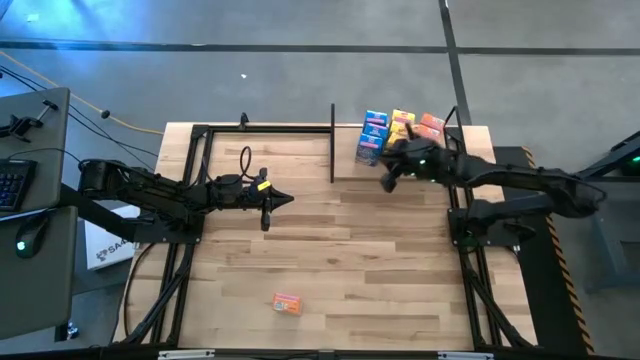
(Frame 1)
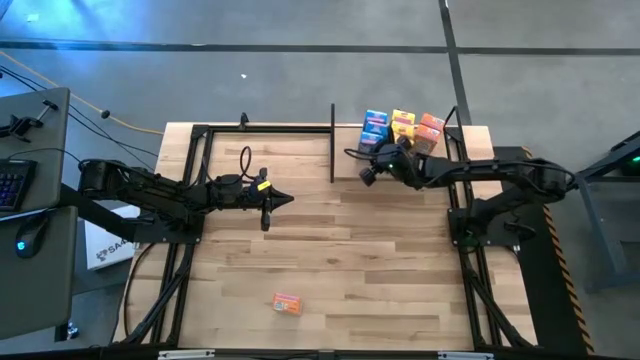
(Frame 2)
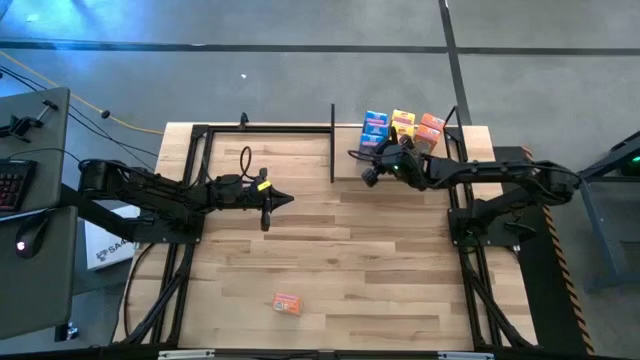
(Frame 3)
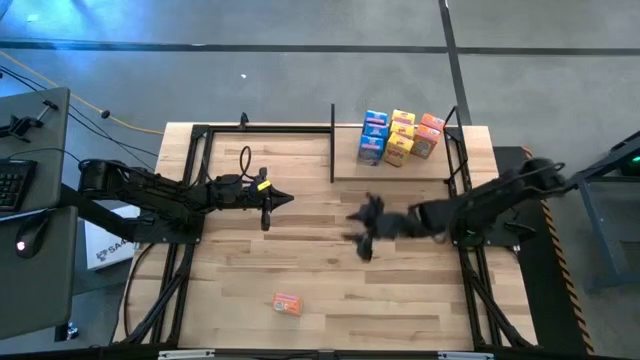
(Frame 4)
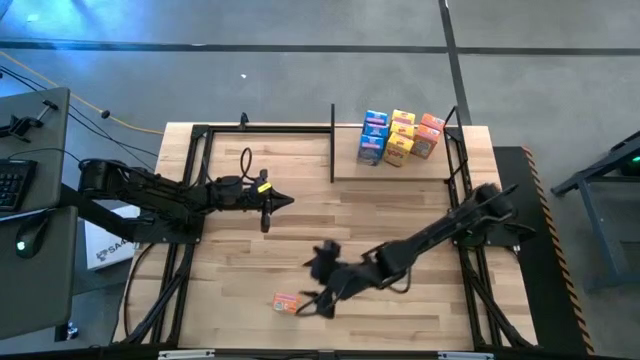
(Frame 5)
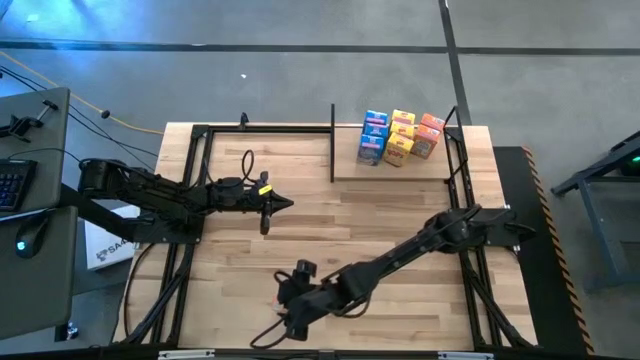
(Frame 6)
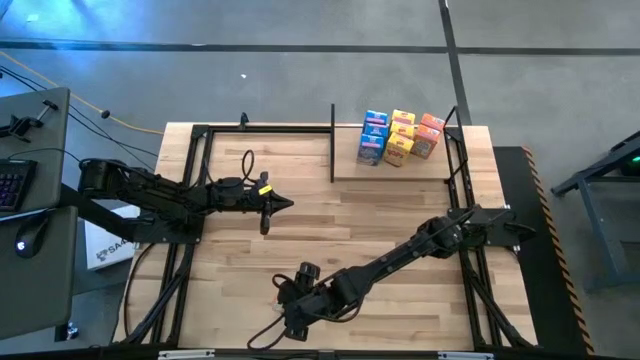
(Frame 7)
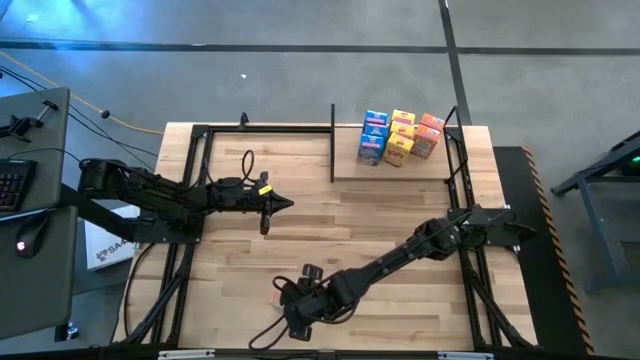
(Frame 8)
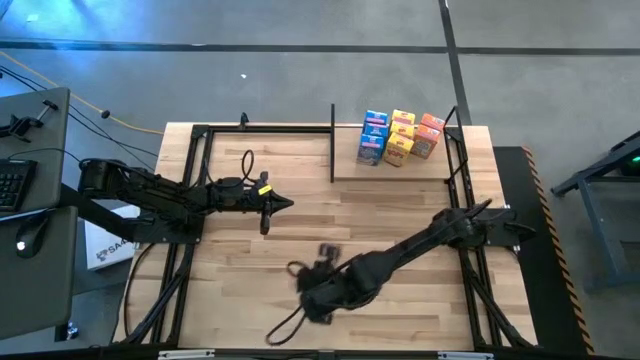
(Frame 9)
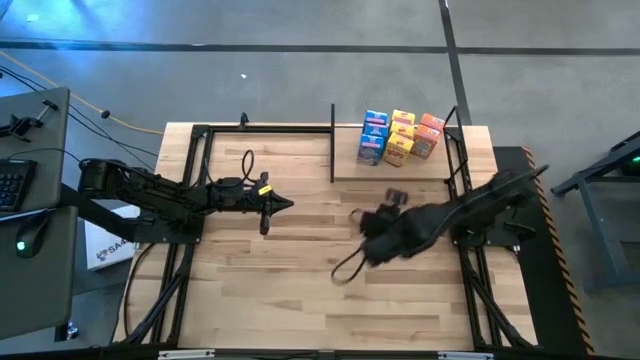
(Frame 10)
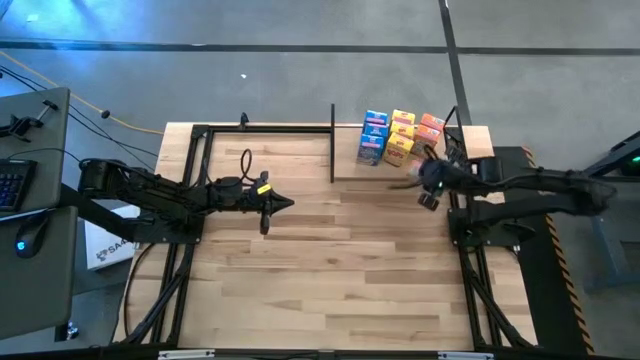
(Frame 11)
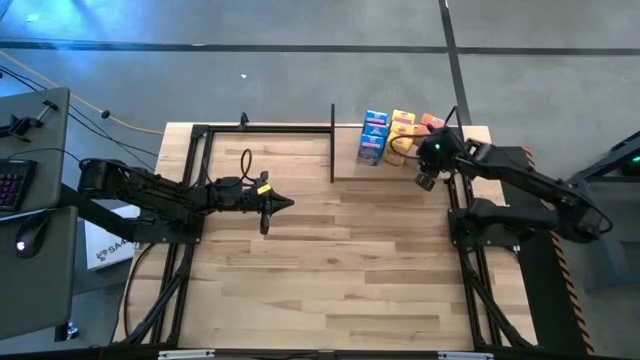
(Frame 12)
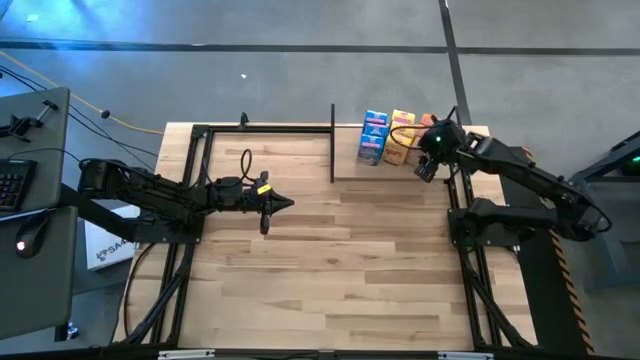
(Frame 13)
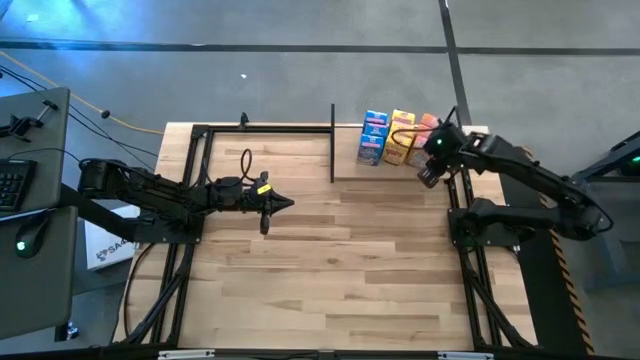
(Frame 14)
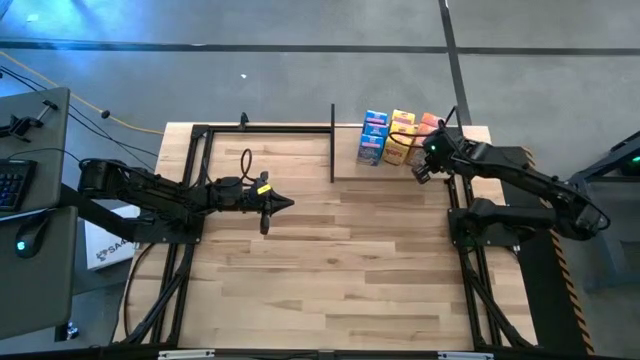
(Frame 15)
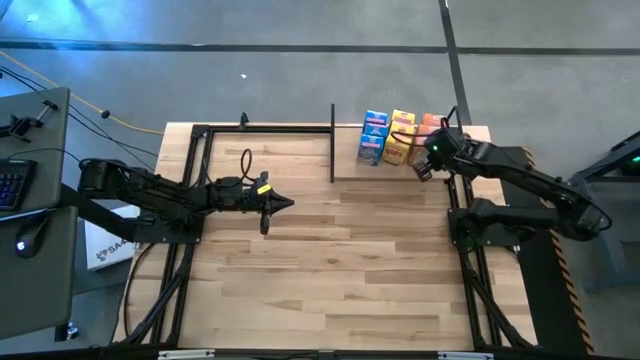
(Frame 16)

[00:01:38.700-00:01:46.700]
Task: Stack cereal on shelf
Put the orange cereal box on the shelf aligned with the other yellow cereal box

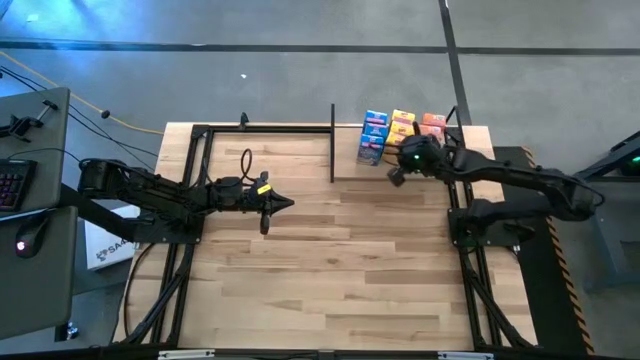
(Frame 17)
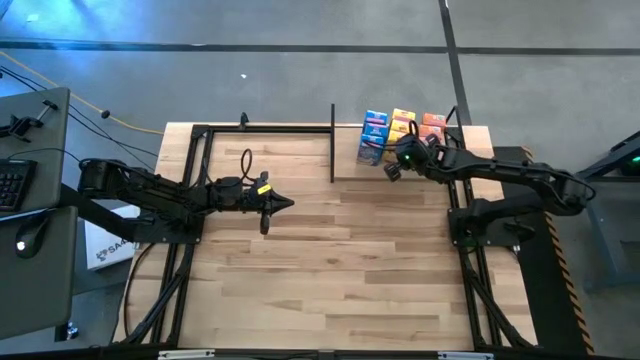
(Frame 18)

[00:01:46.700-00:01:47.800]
Adjust the yellow cereal box

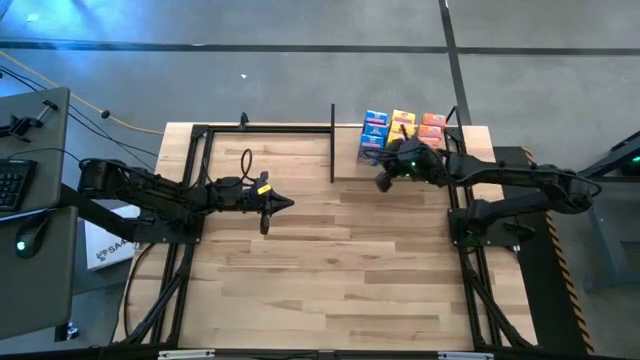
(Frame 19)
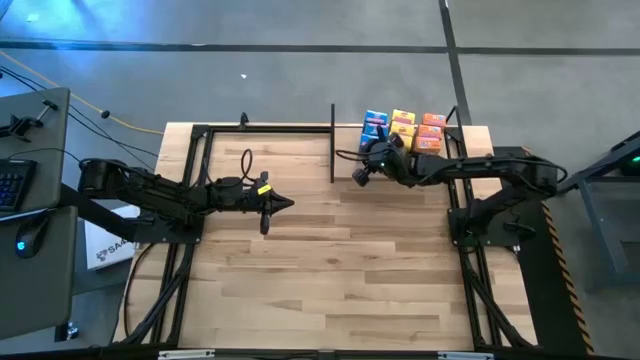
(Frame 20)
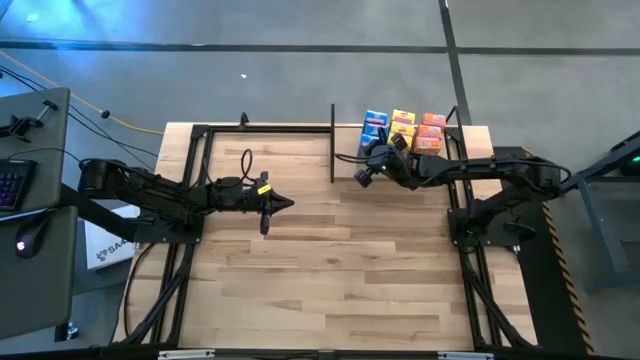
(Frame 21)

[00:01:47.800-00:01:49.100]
Adjust the blue cereal box

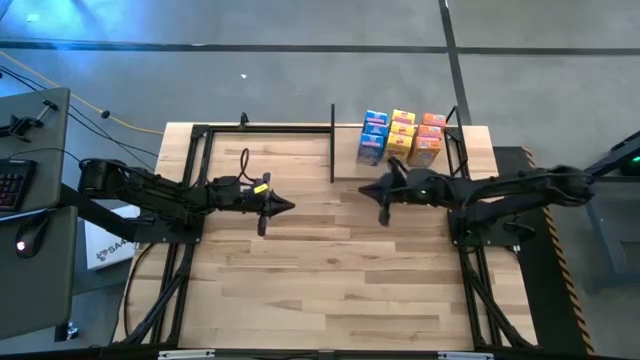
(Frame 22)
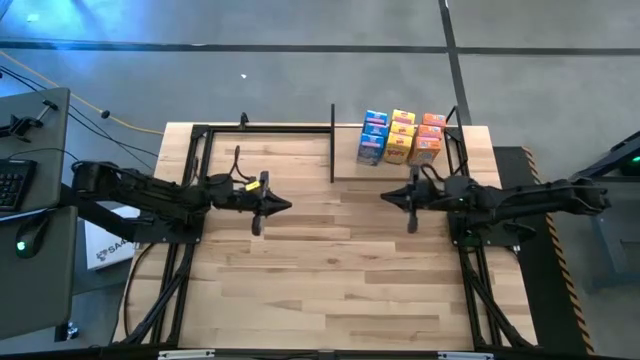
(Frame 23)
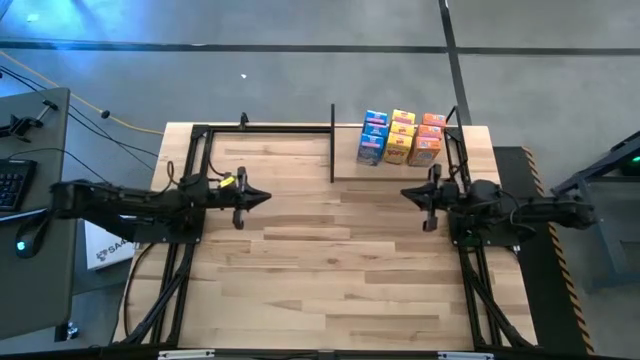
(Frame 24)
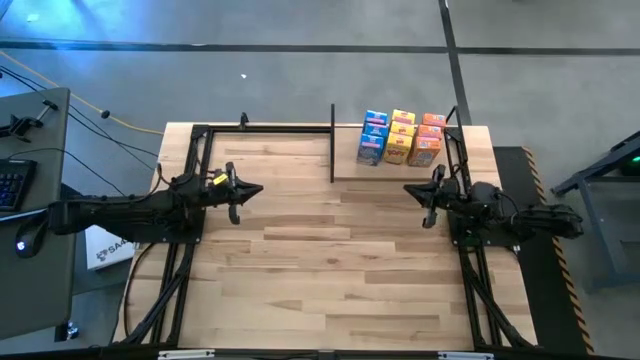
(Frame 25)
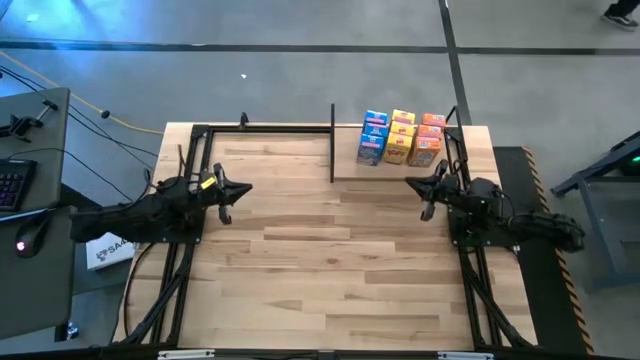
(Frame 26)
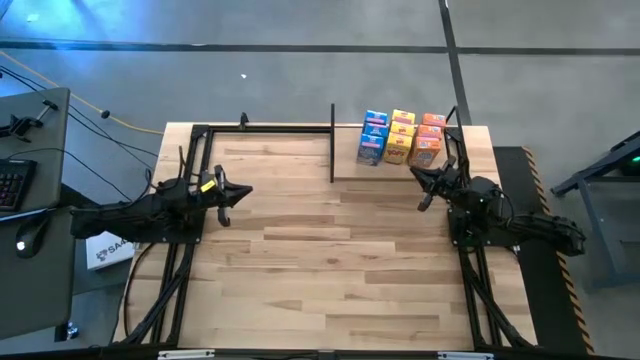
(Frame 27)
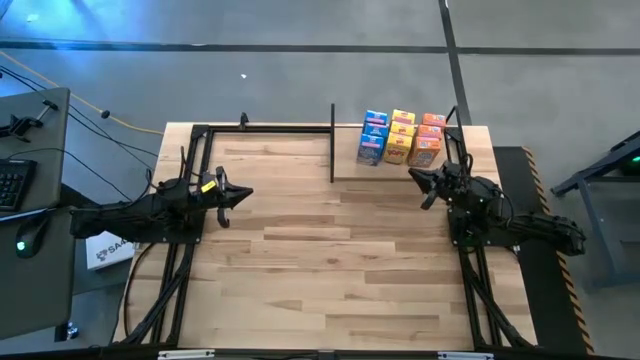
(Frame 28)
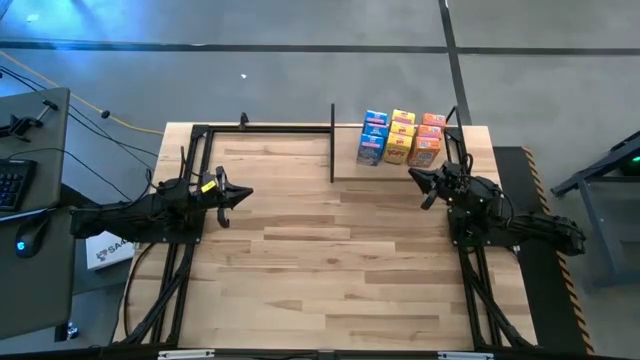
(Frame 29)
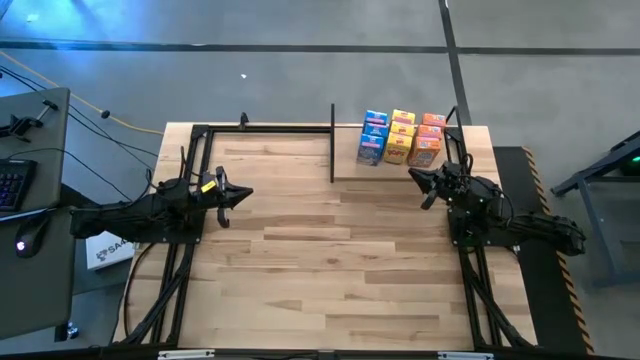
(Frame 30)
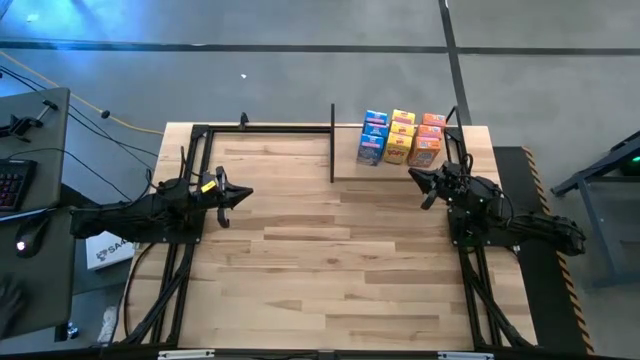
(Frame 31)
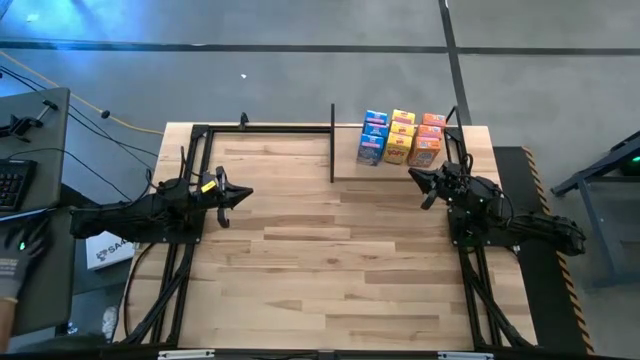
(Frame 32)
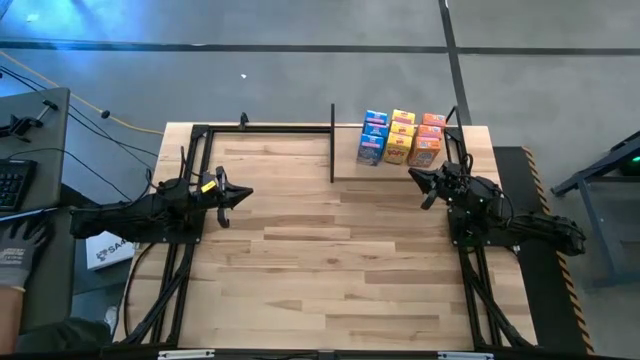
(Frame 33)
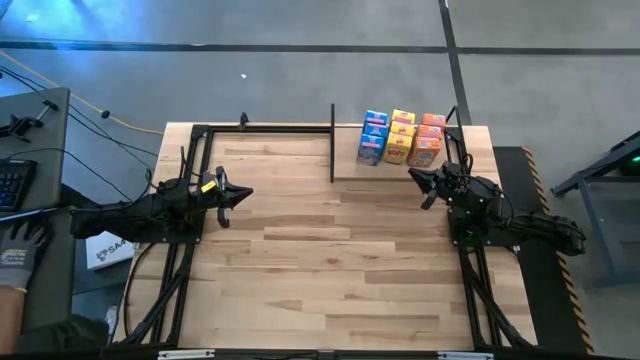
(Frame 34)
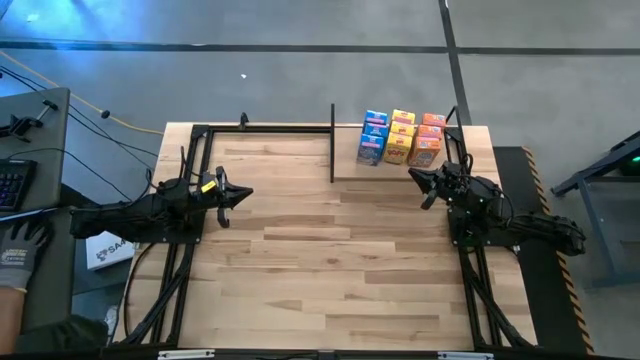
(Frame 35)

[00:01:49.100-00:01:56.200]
Return to Home Position

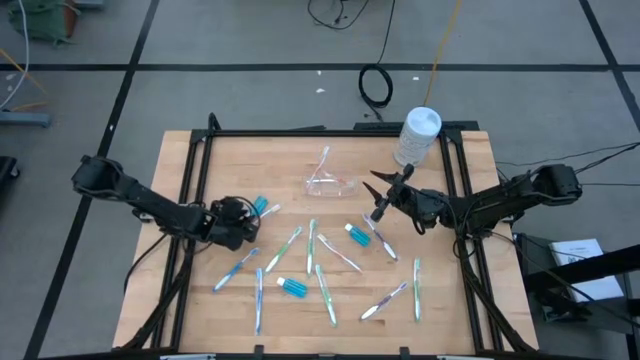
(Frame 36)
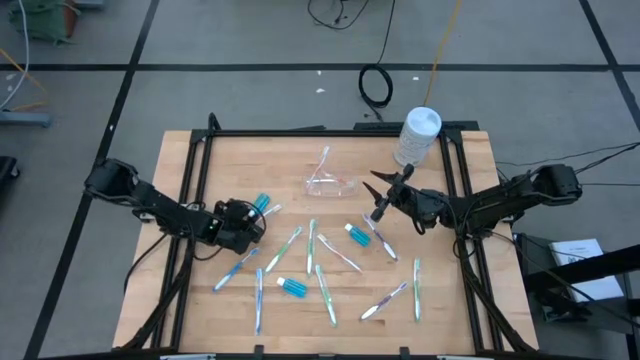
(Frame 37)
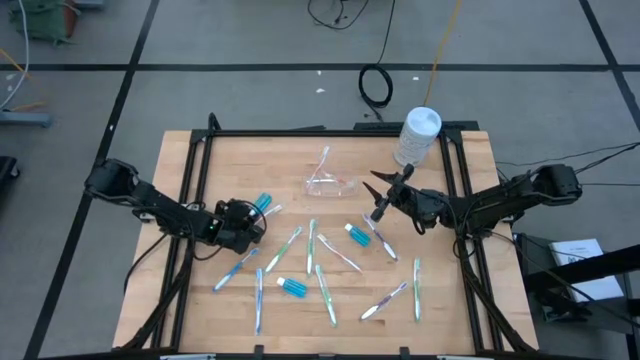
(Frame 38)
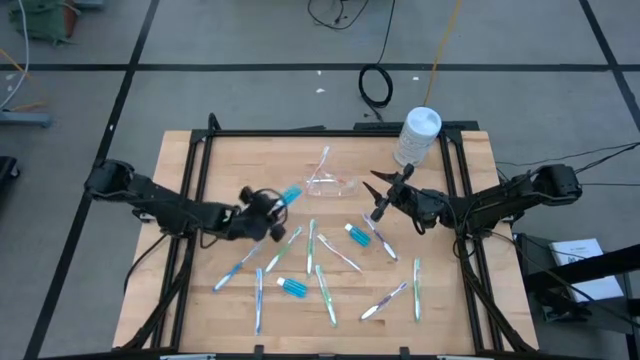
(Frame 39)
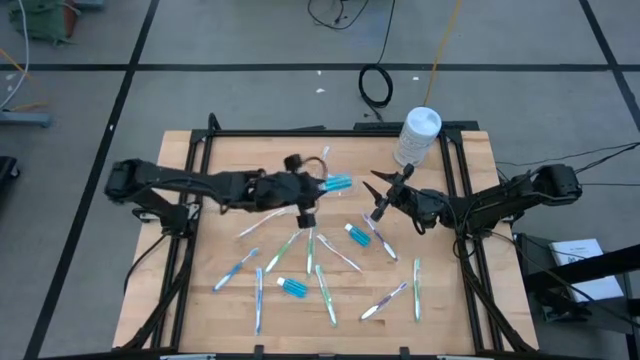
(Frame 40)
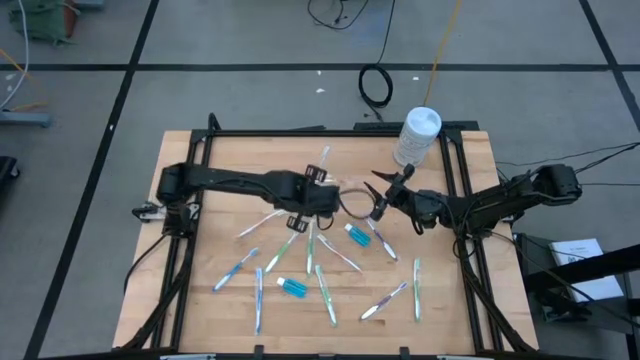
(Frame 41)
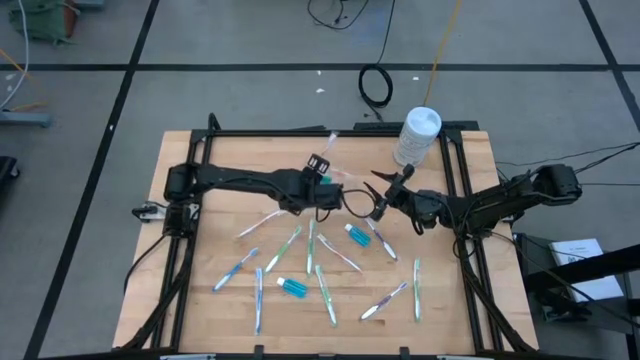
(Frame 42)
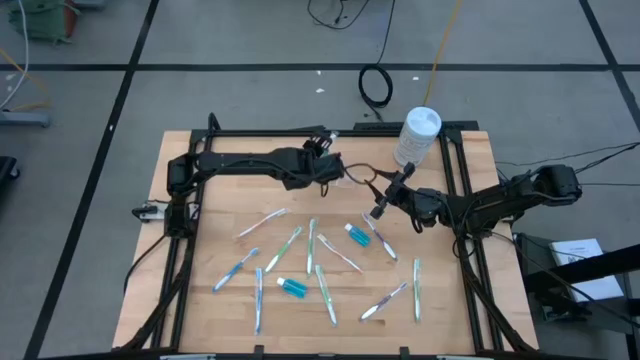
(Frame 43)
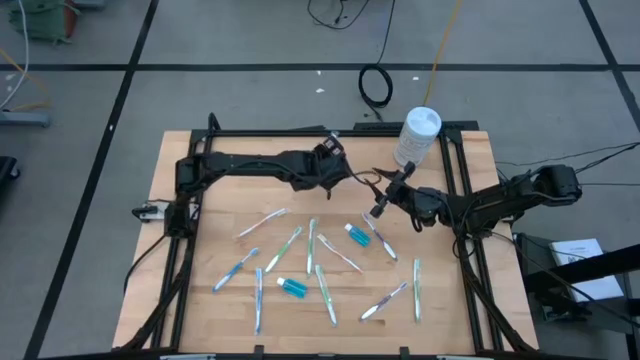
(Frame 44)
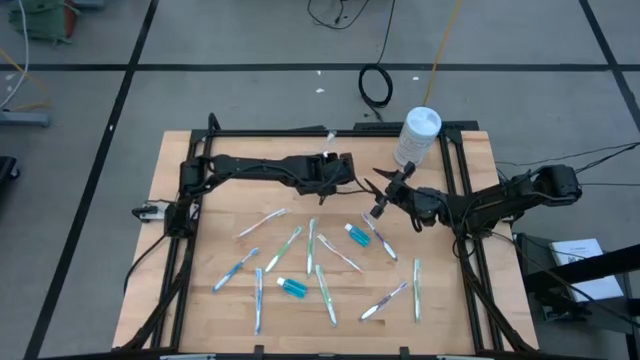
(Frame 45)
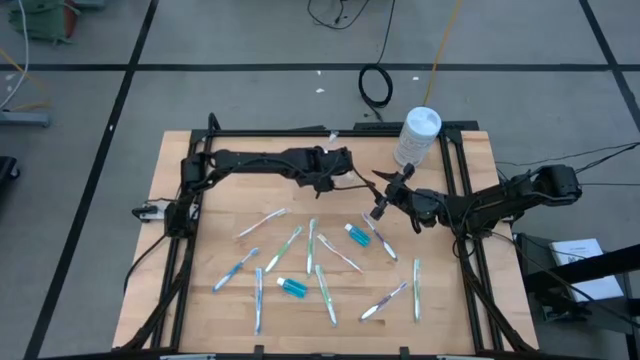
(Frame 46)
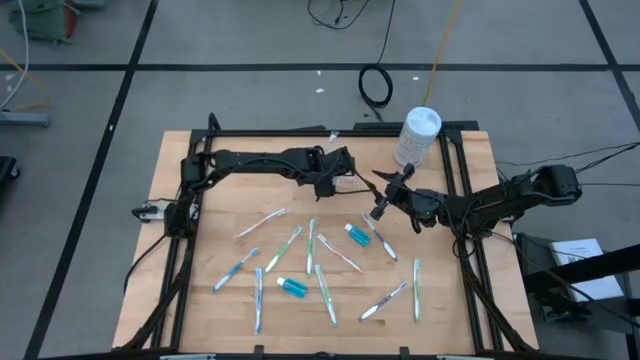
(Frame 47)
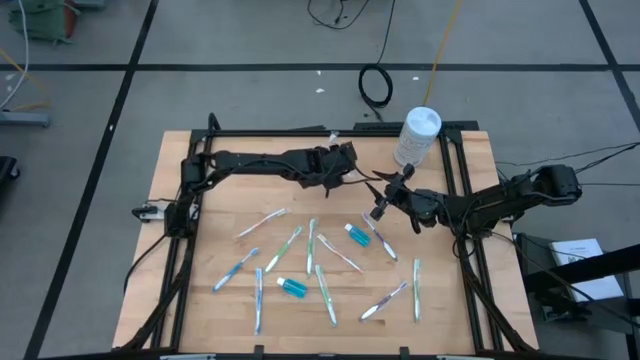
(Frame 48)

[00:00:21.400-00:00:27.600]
Task: Pick & Place toothbrushing station
Put the blue mouthwash into the transparent organizer
